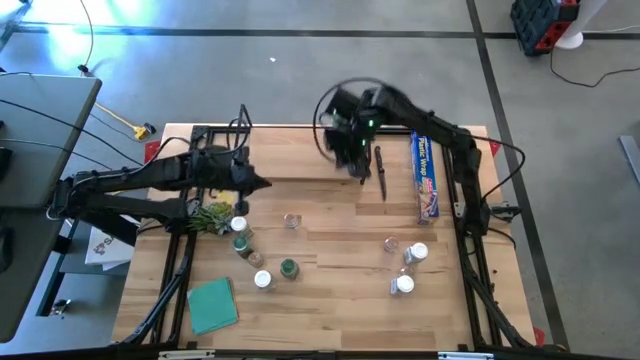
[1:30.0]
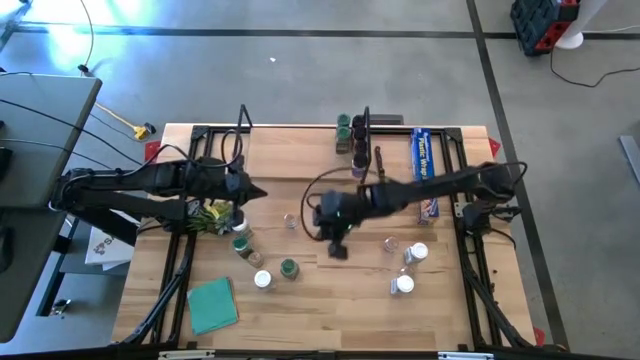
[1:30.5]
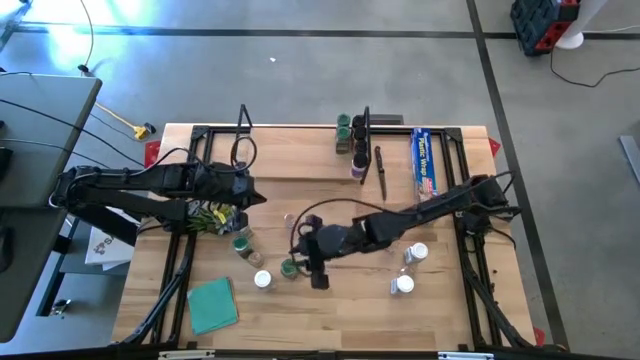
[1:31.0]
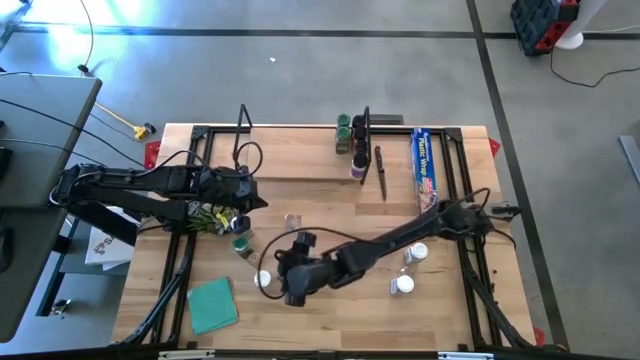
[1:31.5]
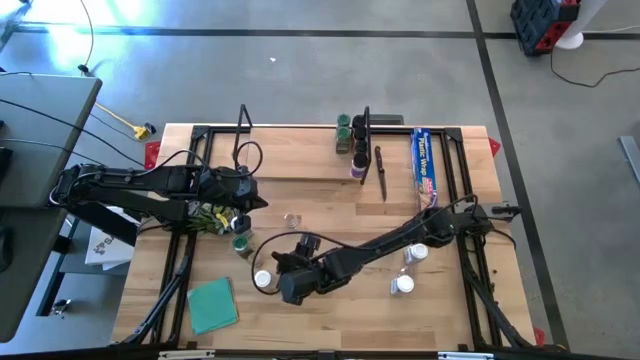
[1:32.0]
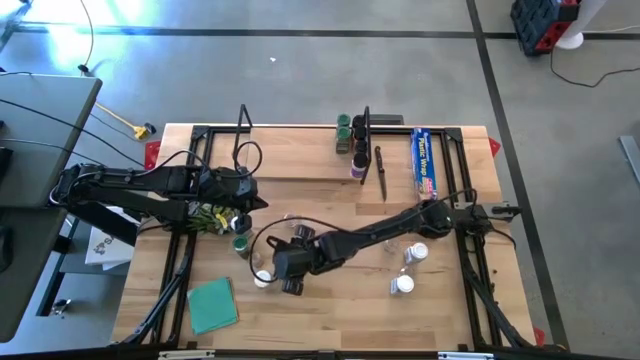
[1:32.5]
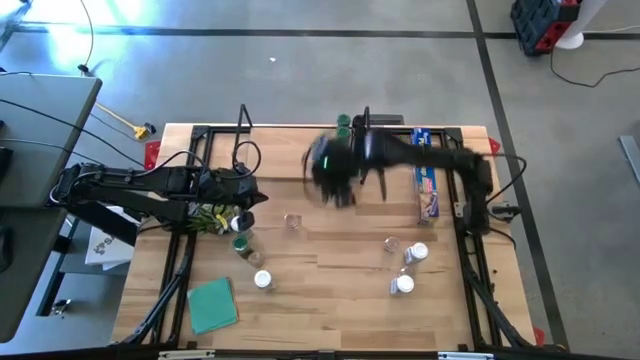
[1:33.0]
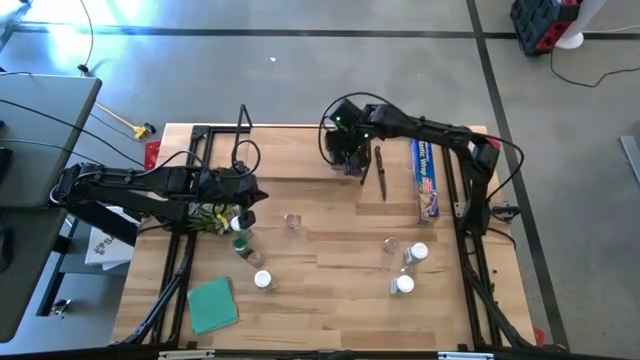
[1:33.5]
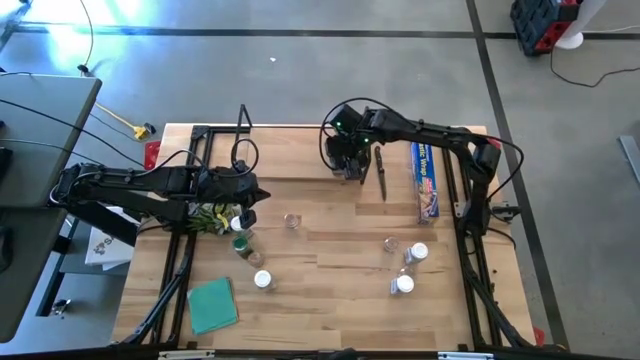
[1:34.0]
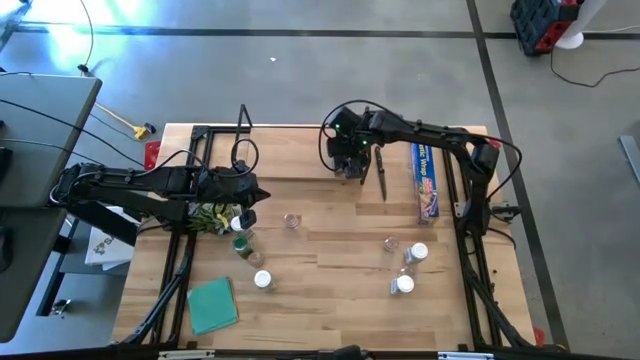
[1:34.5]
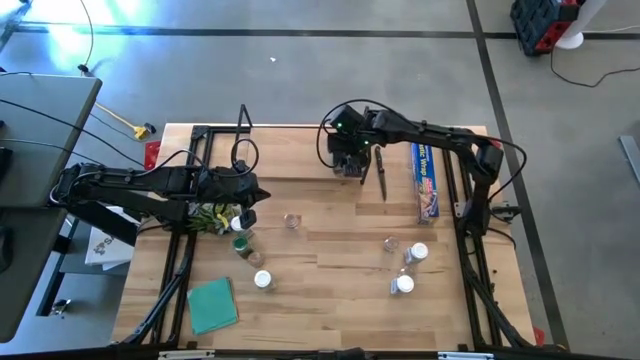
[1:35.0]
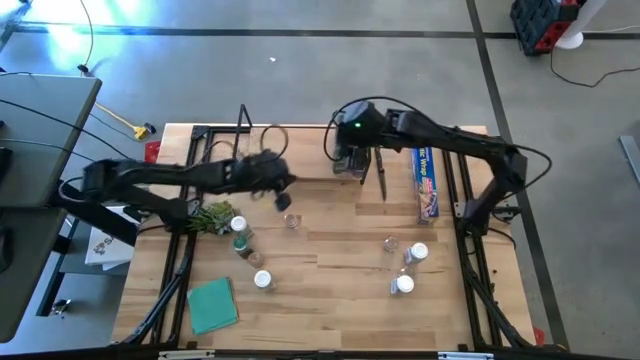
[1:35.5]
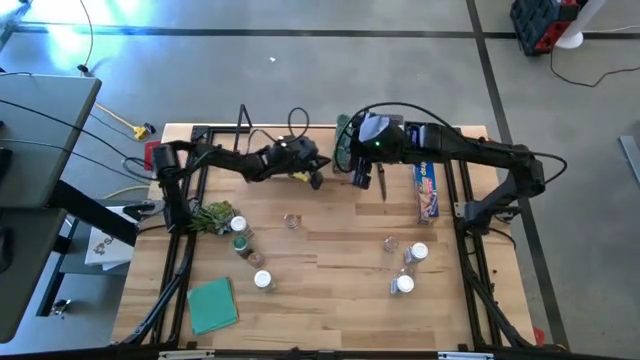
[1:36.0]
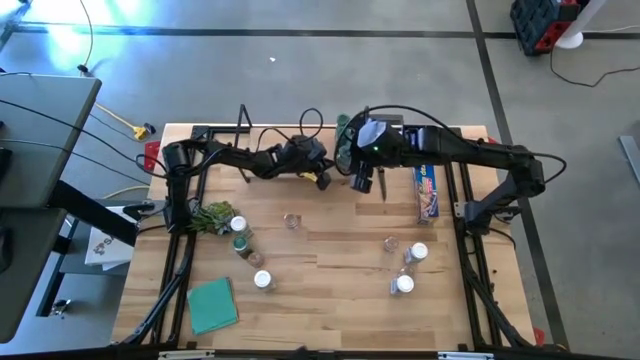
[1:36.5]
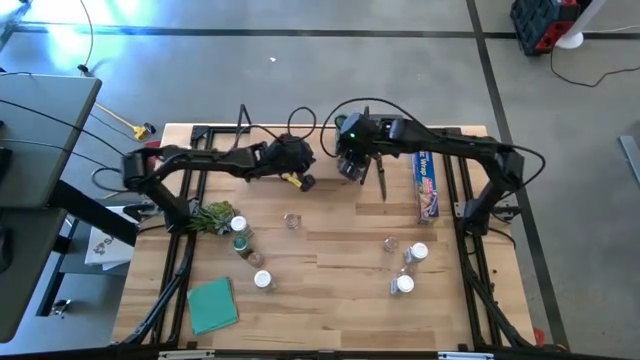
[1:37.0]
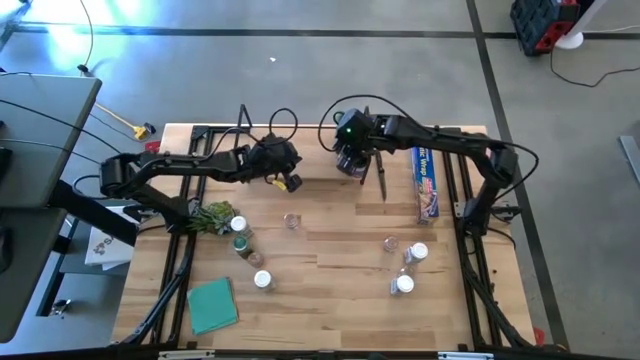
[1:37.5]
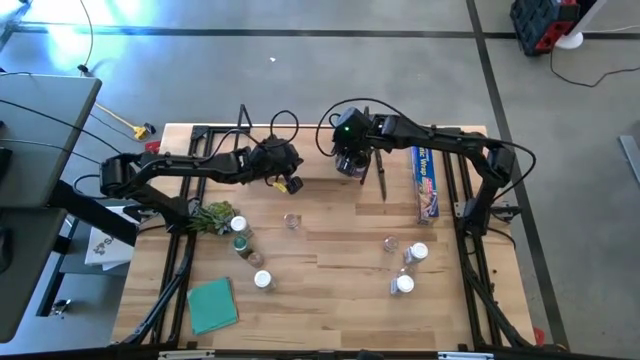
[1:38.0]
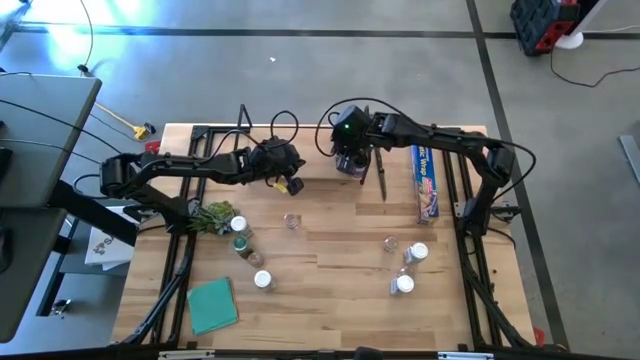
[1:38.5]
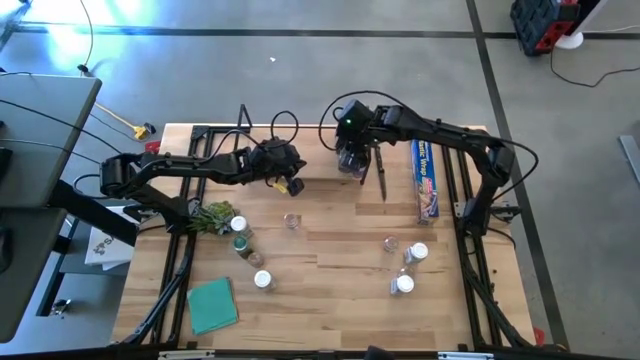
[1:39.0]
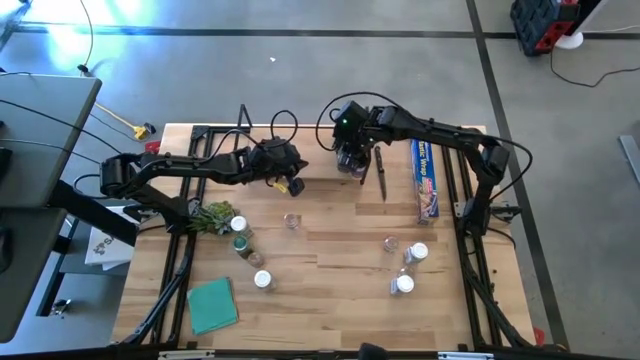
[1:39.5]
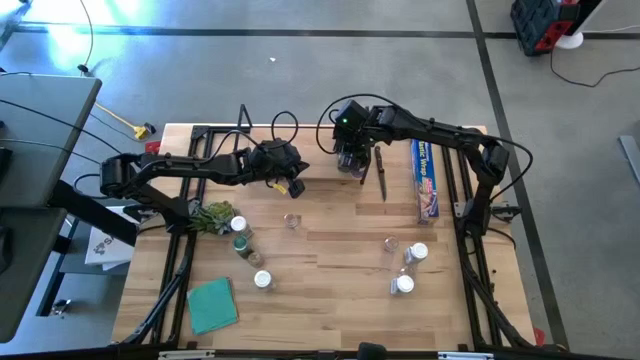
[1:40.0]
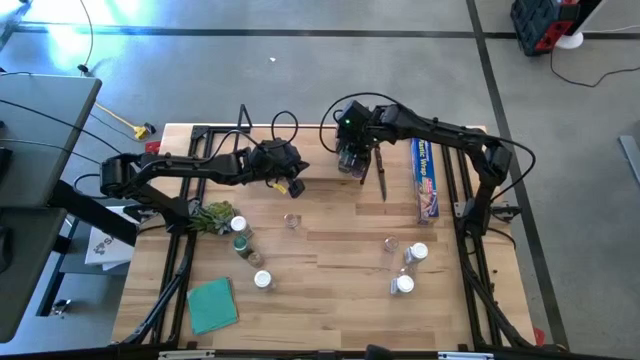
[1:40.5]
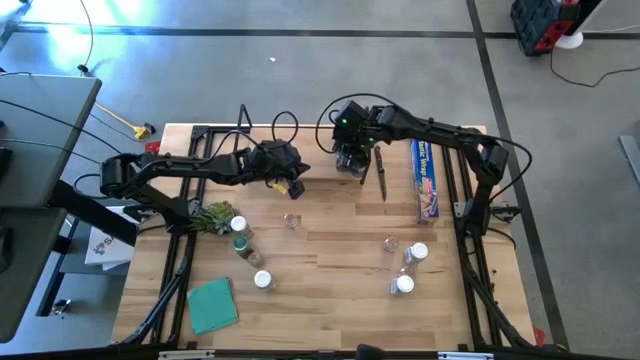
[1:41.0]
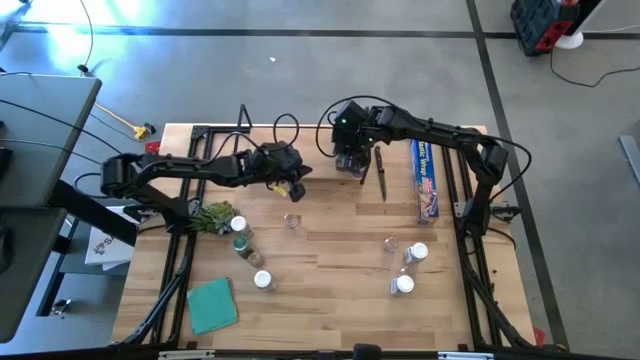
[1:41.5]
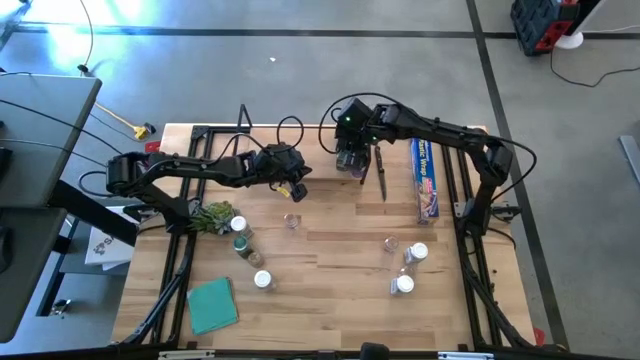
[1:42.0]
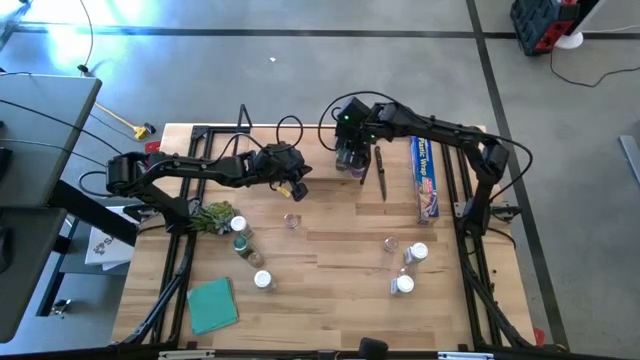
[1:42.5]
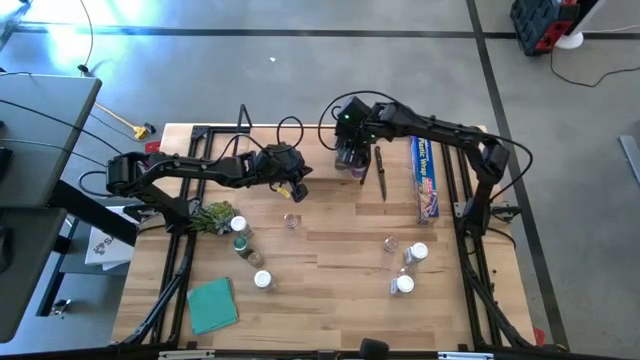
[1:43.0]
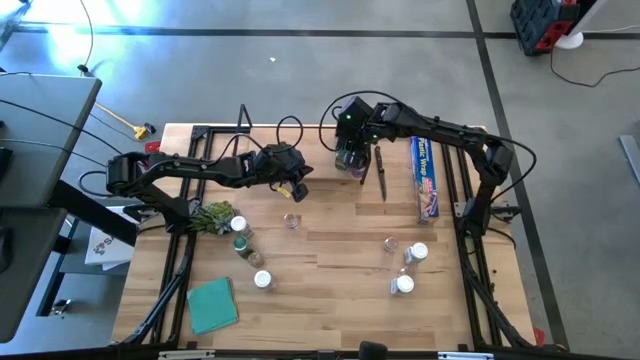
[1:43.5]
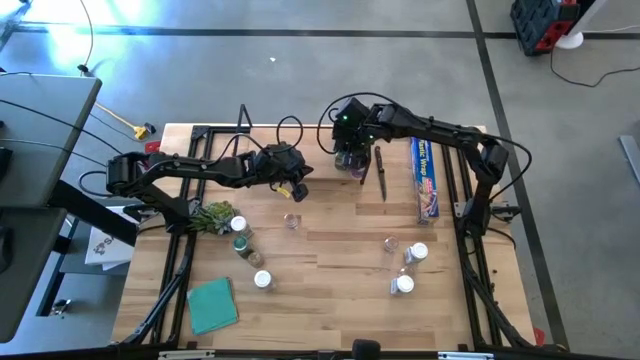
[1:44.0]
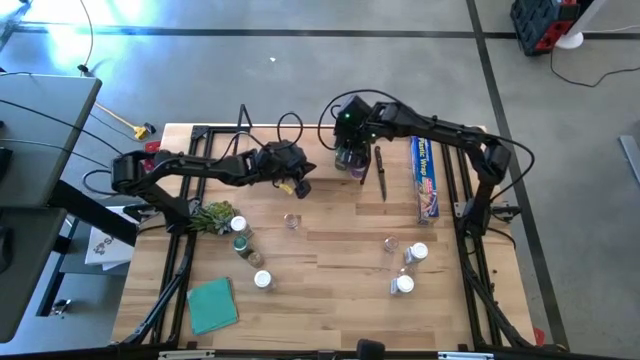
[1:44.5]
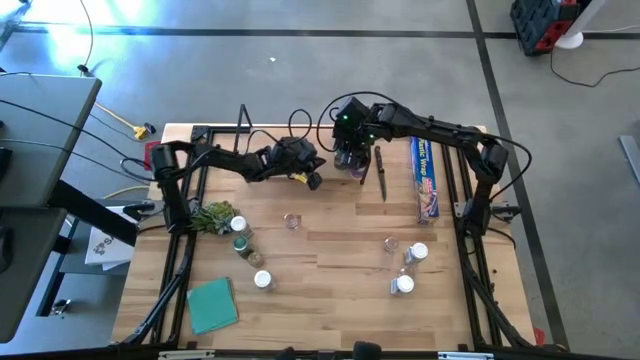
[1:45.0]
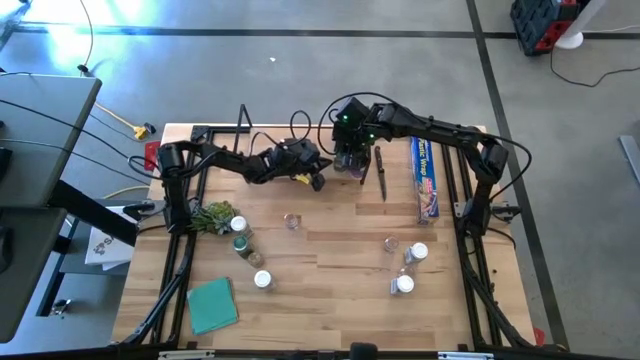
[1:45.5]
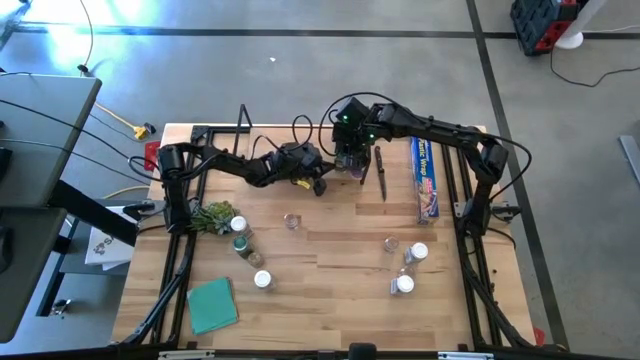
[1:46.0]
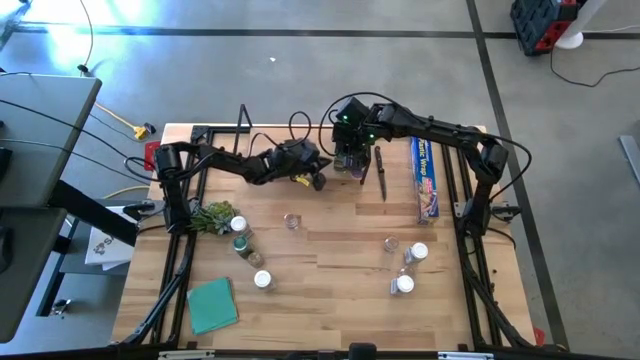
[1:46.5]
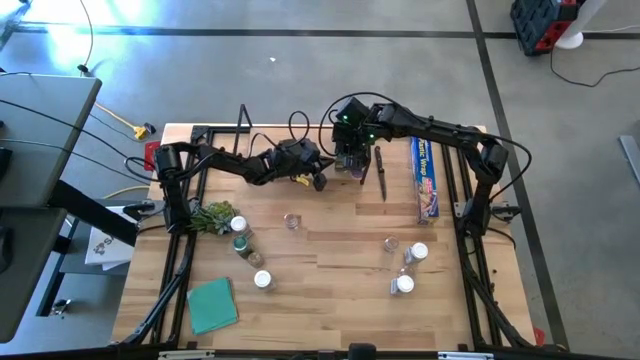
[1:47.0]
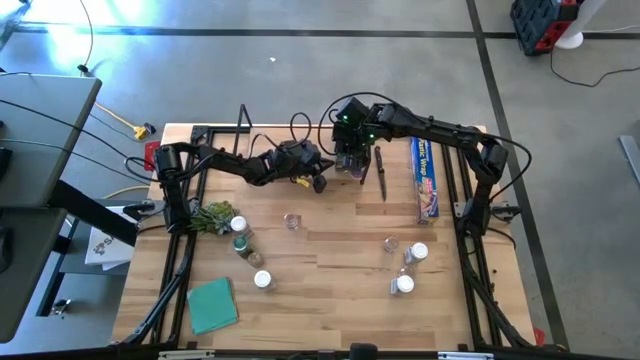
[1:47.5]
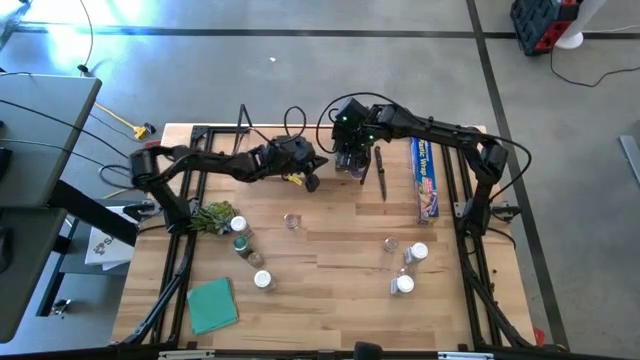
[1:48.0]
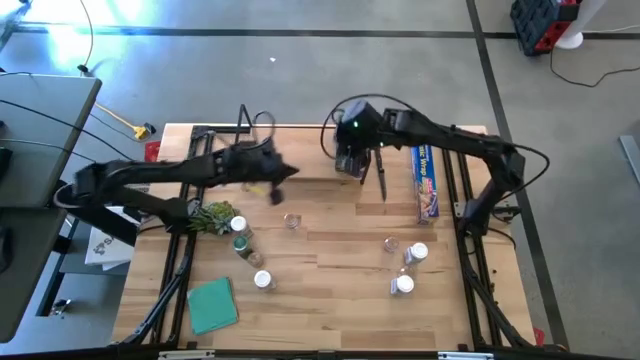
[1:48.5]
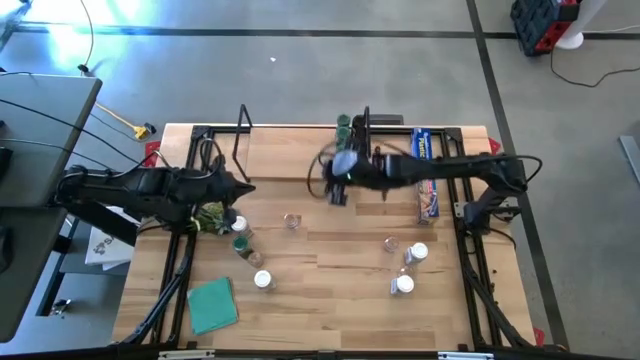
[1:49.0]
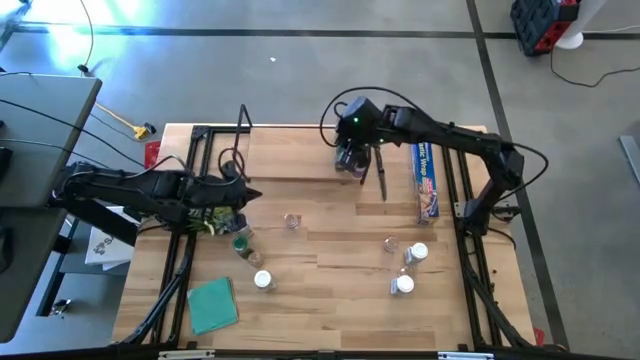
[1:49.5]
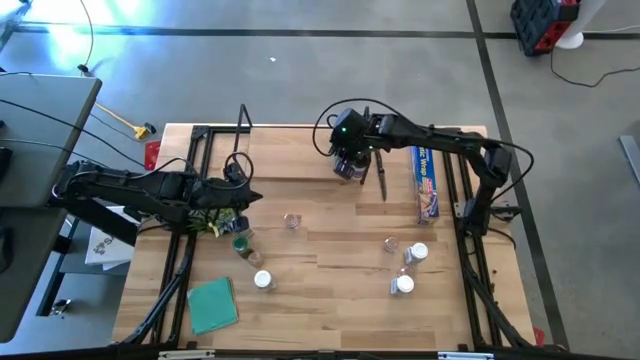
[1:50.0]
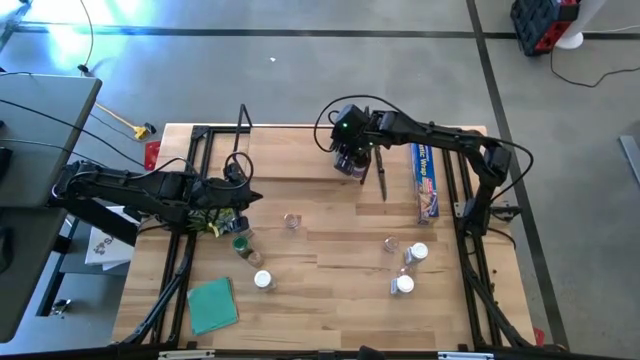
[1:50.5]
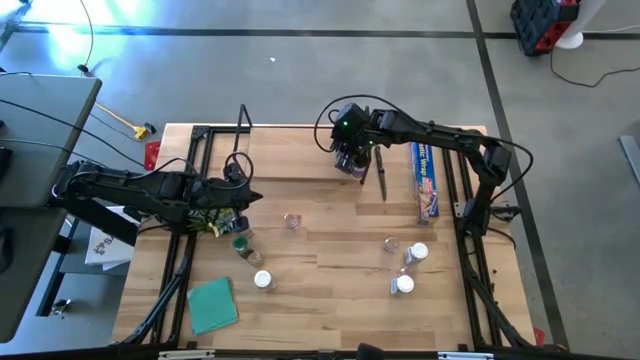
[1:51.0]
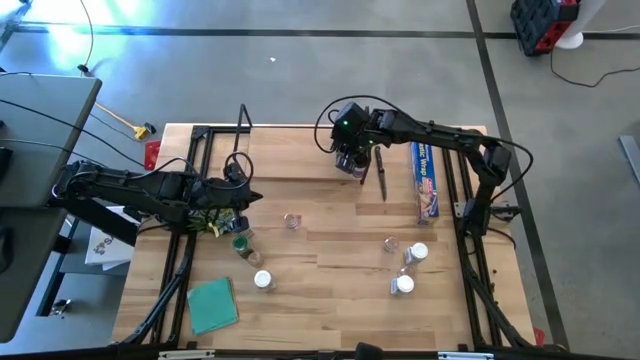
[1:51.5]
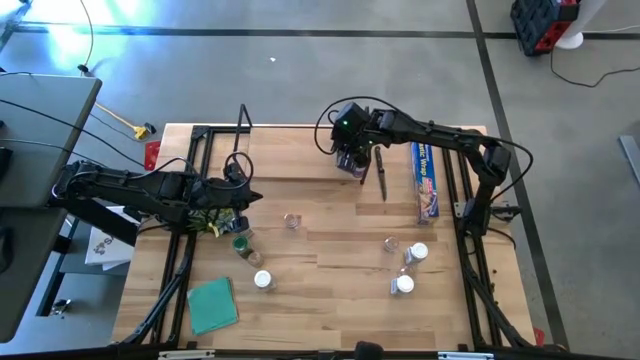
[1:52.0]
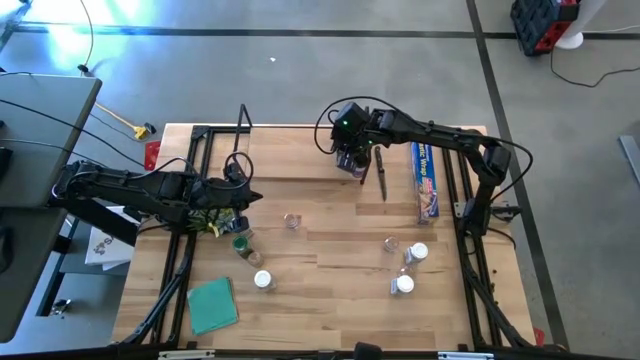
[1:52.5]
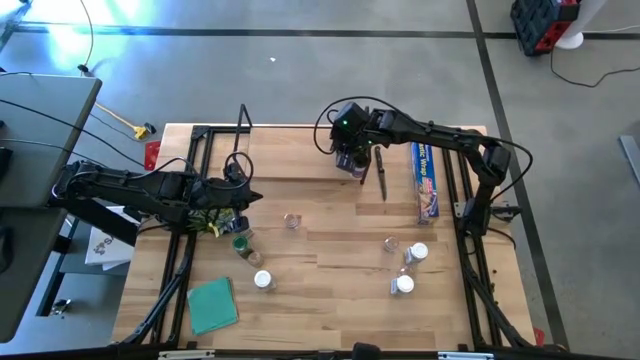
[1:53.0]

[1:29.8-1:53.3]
Task: Shelf spices
Put the green seasoning bottle on the shelf aligned with the other green seasoning bottles
